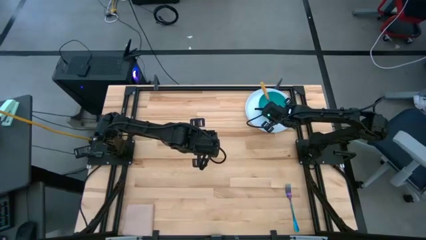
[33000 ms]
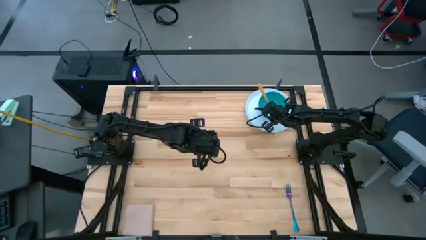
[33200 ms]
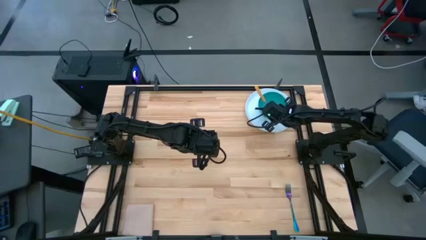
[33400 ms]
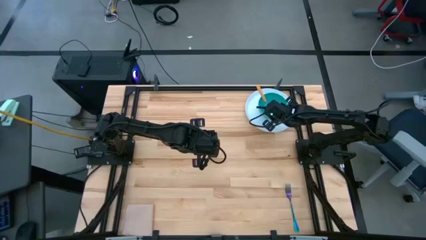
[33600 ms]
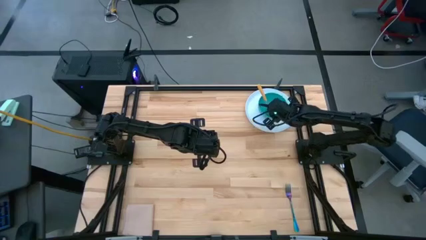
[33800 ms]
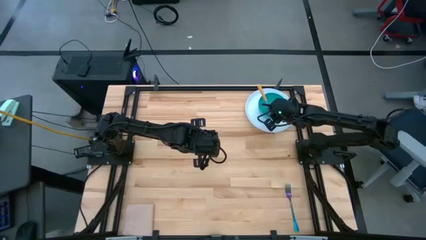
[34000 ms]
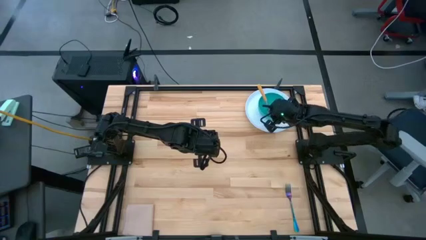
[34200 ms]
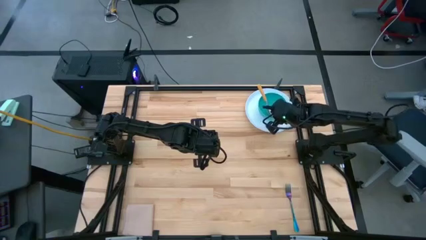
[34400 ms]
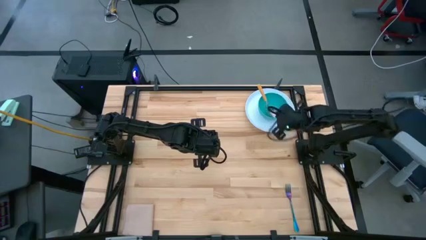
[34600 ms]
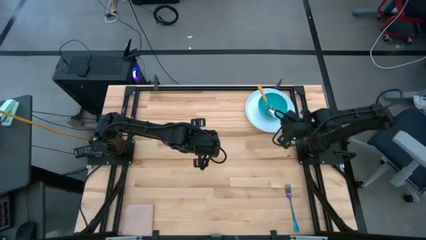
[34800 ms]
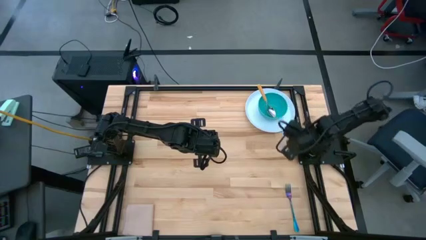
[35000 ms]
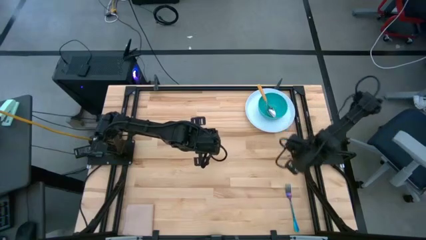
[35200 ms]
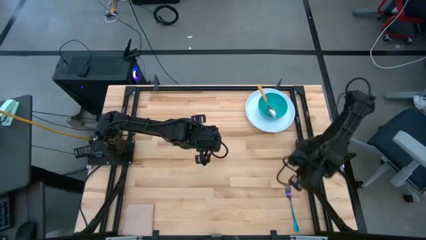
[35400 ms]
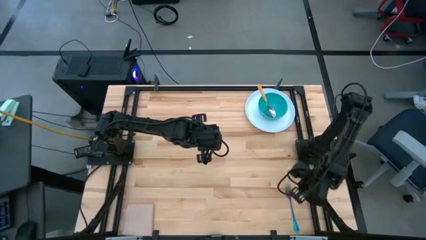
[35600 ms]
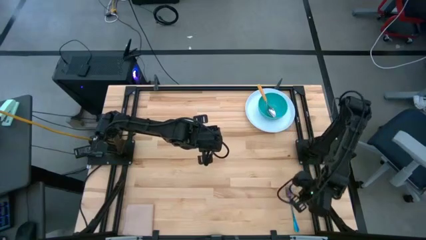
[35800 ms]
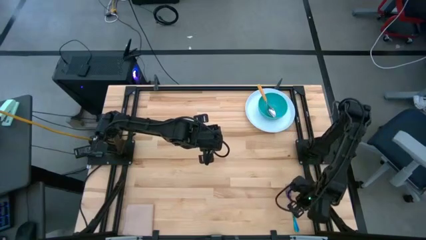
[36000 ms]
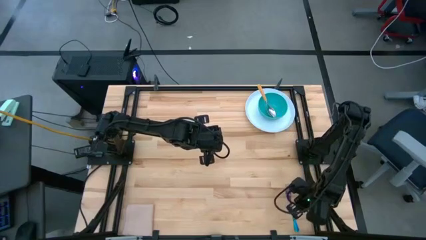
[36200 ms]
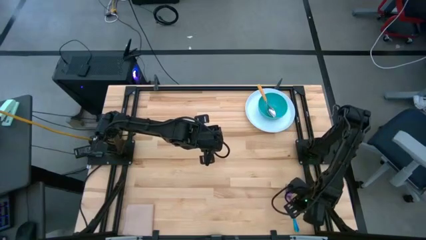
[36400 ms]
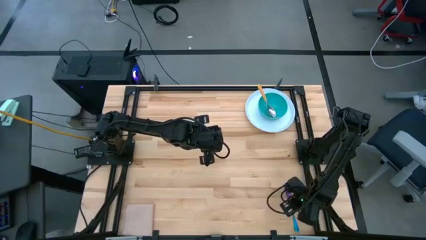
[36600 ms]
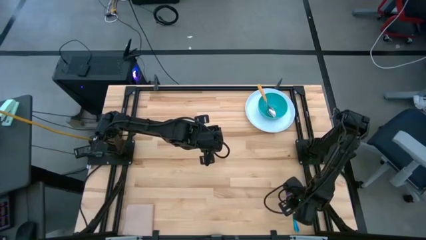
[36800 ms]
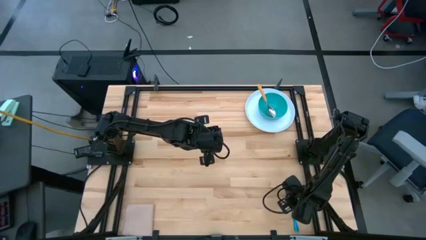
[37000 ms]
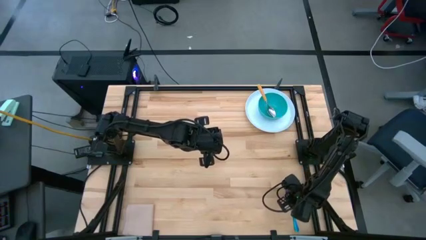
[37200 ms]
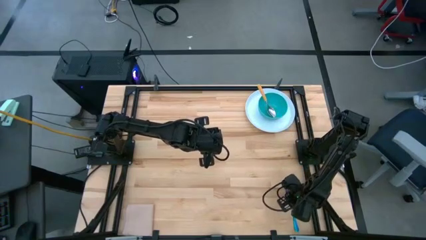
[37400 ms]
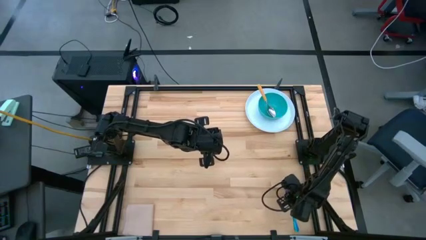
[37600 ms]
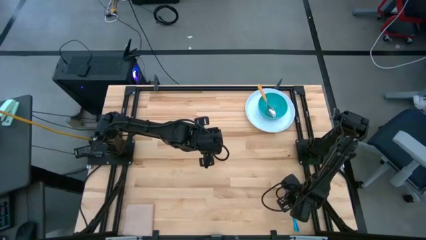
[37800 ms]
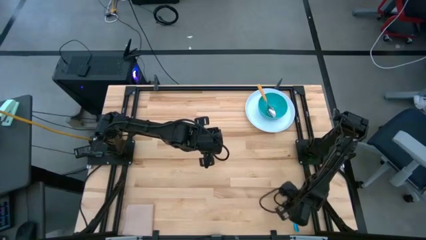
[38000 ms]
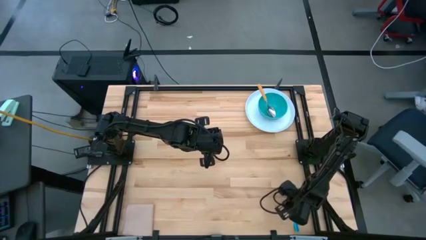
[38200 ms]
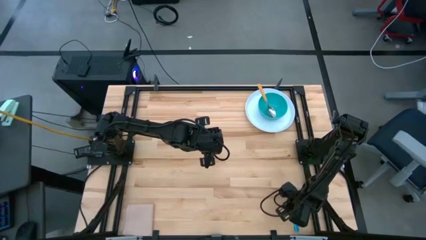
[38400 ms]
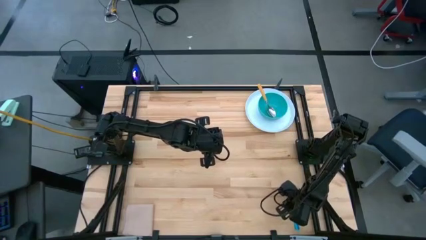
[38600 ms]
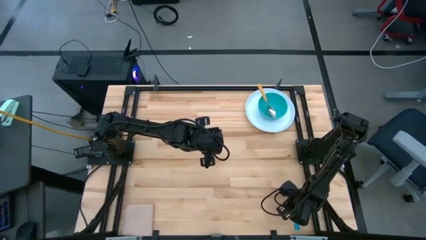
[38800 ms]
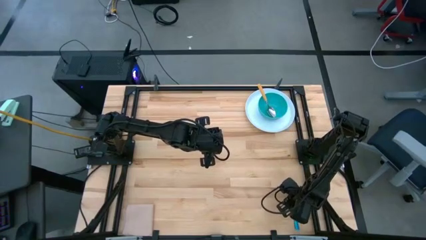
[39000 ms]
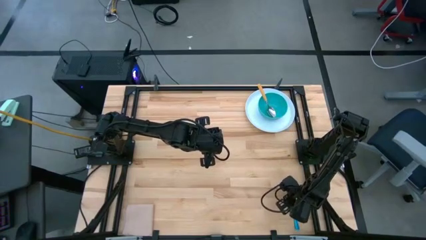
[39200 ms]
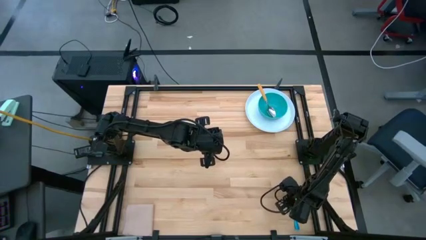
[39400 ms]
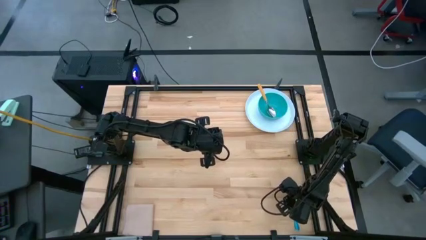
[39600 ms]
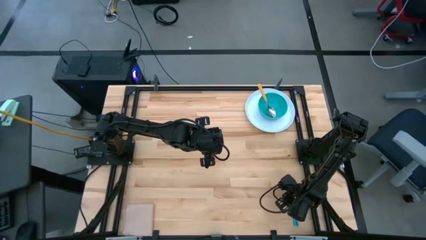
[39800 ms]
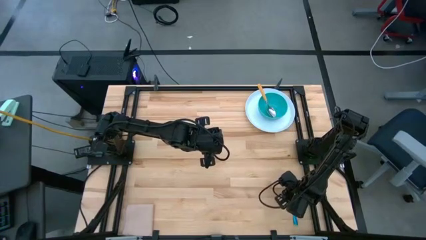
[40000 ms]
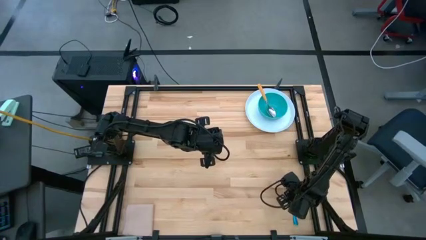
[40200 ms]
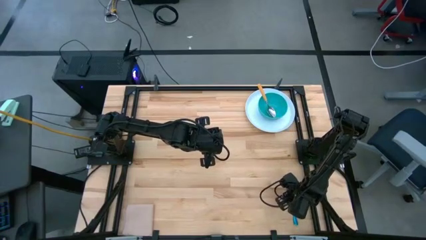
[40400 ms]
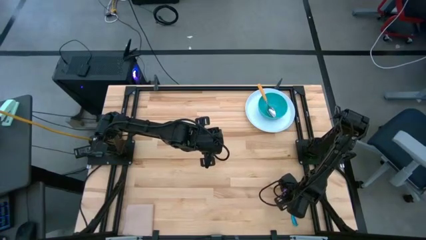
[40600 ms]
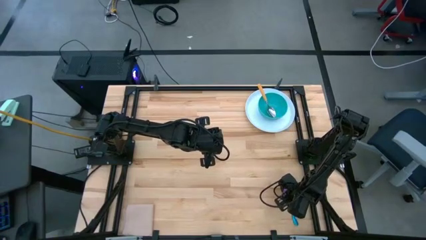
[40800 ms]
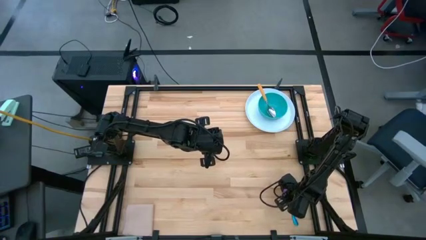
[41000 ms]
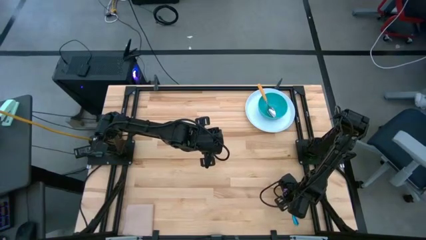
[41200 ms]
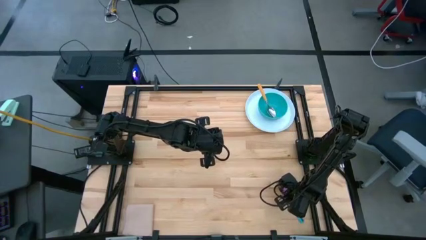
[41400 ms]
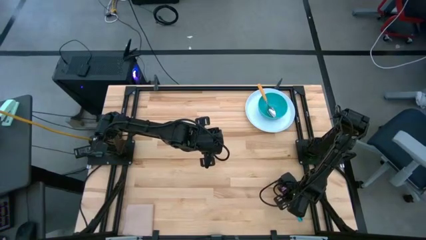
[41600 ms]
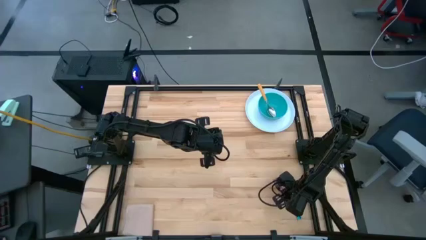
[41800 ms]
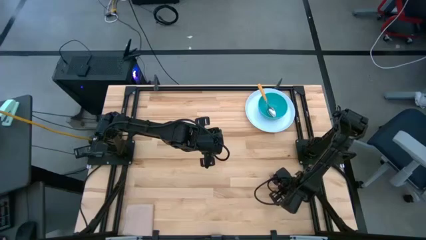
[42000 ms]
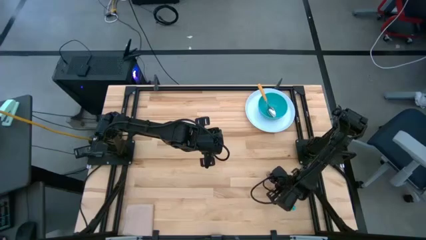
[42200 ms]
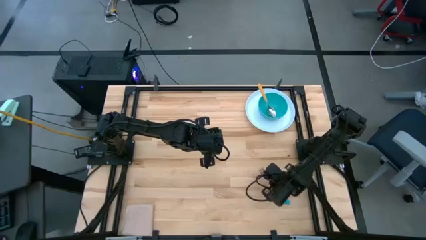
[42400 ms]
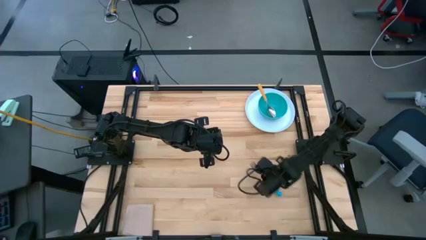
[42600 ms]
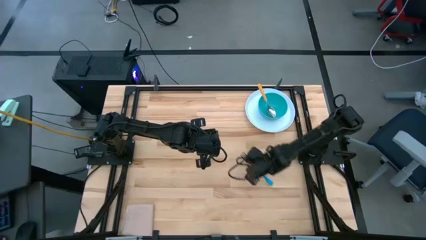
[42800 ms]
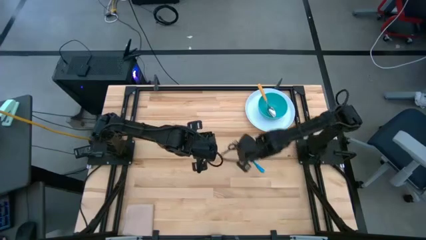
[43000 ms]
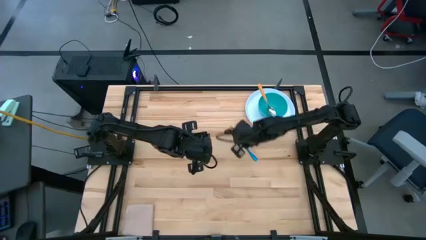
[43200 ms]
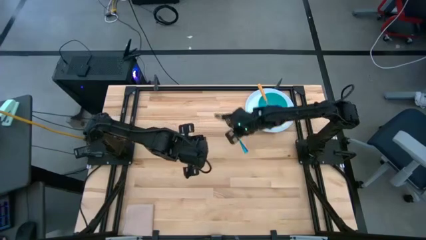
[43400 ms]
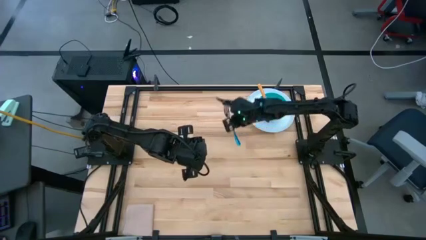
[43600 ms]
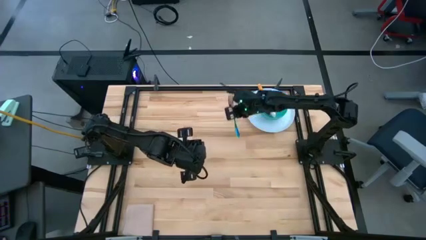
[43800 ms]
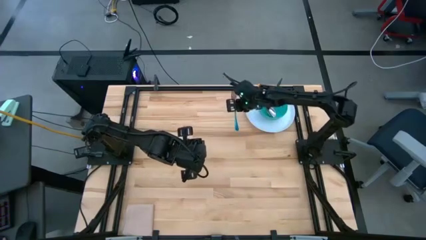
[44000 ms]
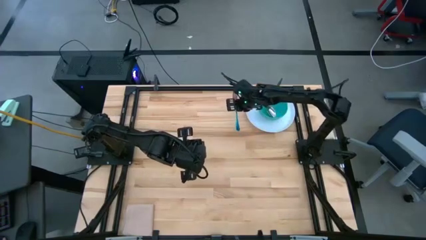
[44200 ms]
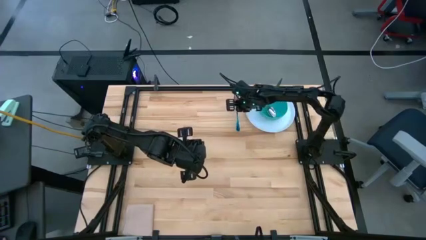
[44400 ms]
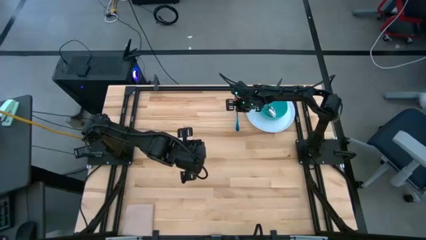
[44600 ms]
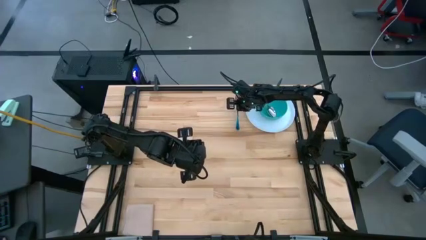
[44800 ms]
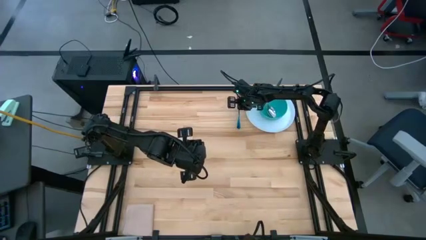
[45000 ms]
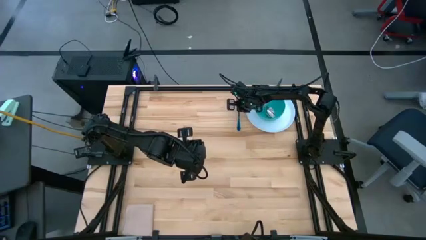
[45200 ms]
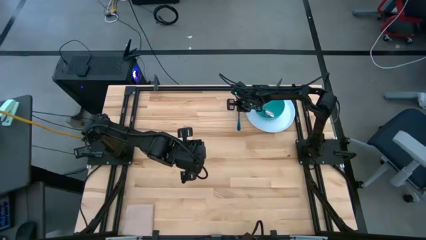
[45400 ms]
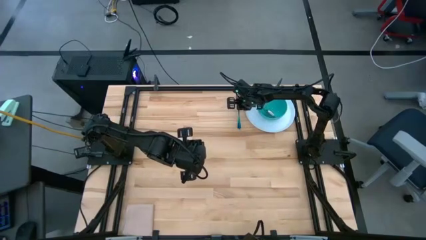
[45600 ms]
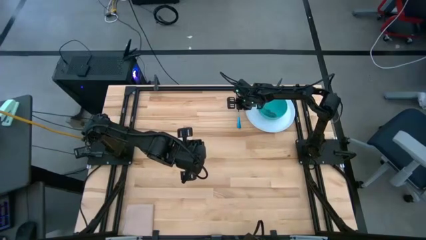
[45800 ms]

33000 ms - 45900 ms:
Task: Set table place
Move the blue fork to the left side of the blue plate
